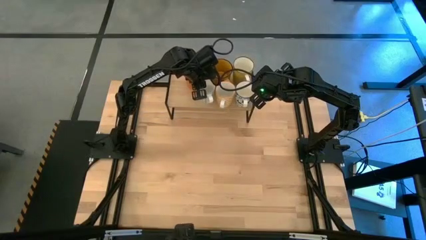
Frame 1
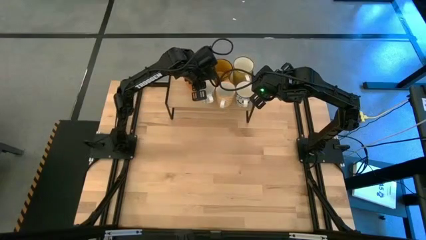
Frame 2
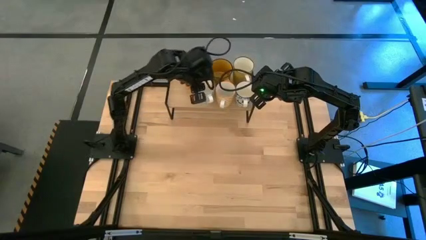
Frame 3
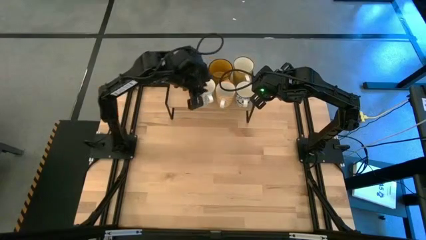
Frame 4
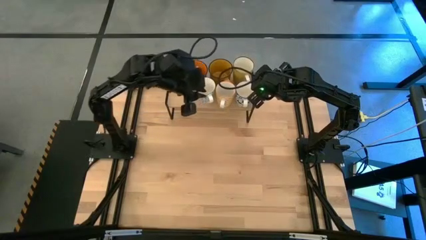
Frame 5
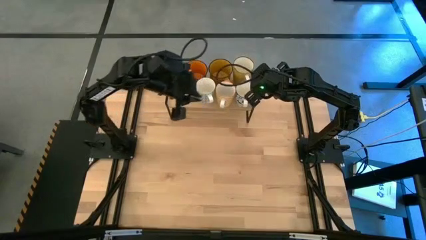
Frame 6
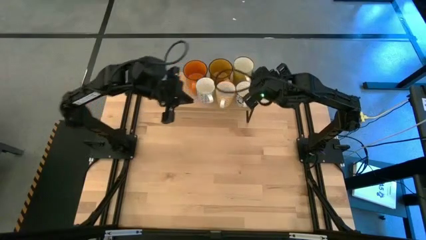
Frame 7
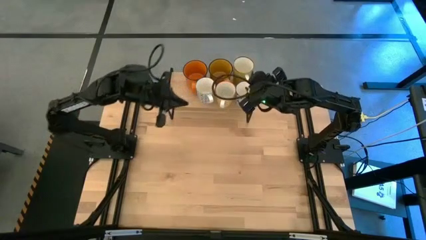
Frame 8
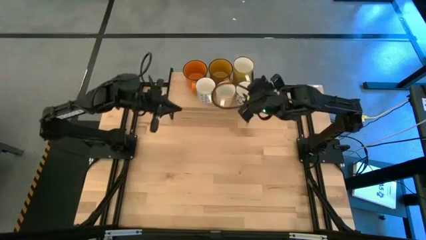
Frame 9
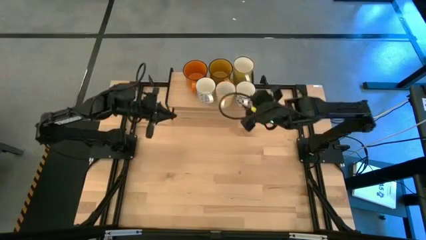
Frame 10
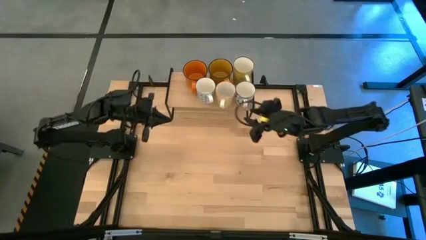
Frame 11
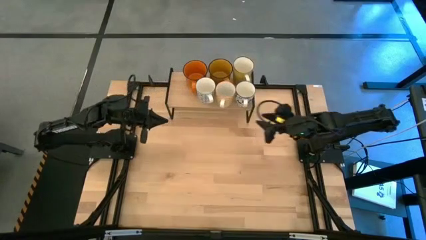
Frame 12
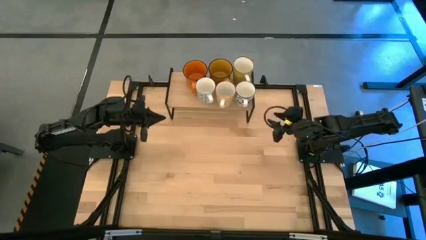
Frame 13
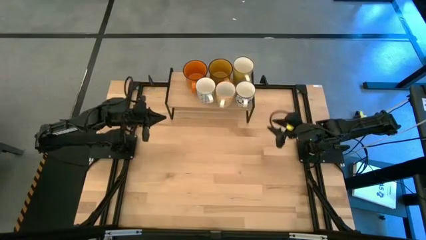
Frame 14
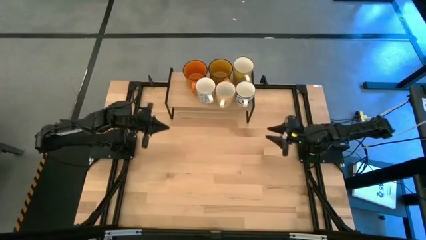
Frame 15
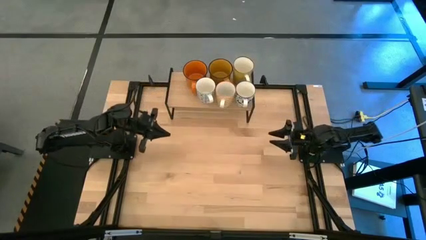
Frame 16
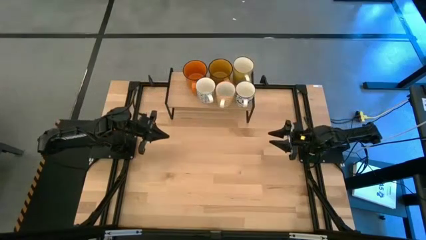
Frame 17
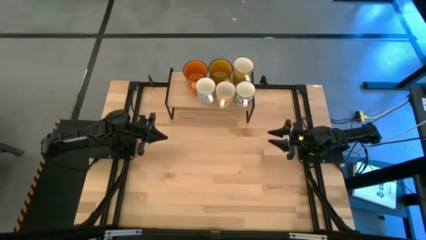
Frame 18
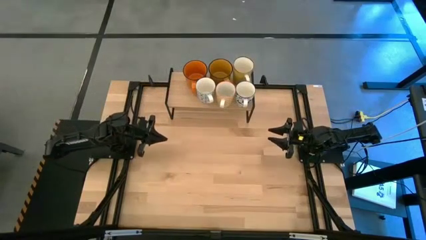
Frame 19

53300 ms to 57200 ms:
Task: Place coffee mugs
Return to Home Position

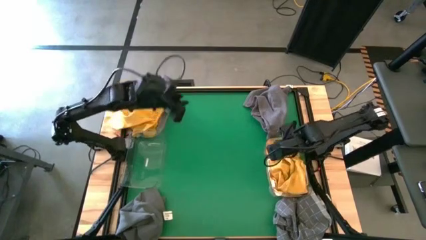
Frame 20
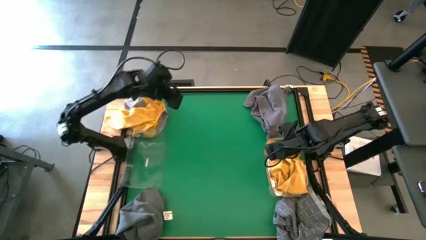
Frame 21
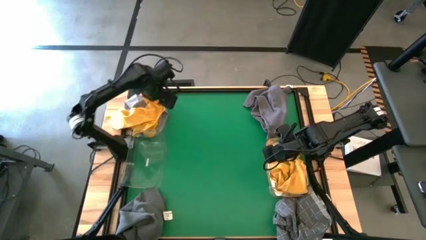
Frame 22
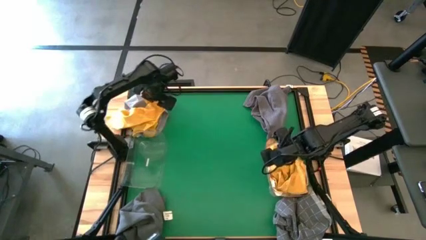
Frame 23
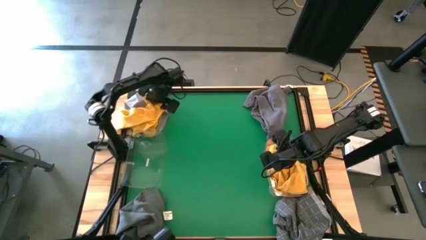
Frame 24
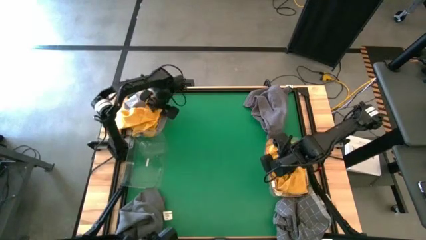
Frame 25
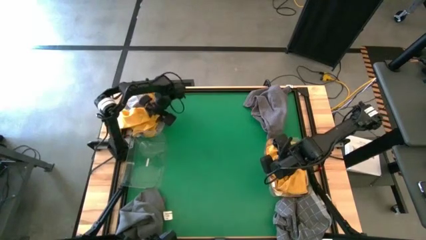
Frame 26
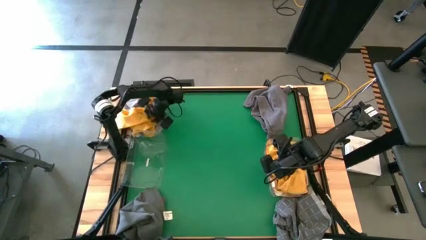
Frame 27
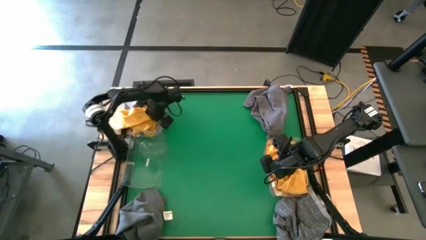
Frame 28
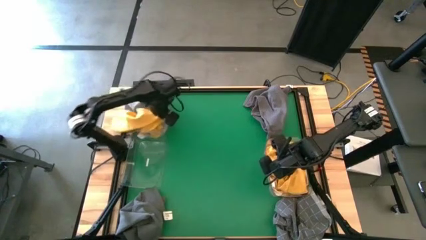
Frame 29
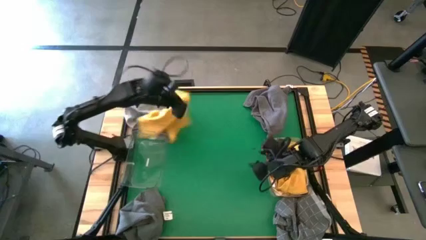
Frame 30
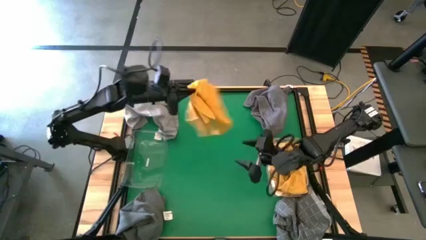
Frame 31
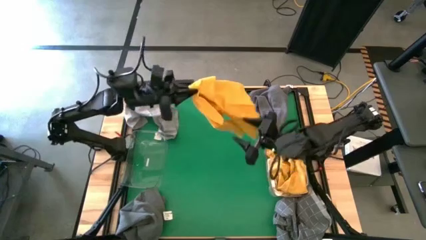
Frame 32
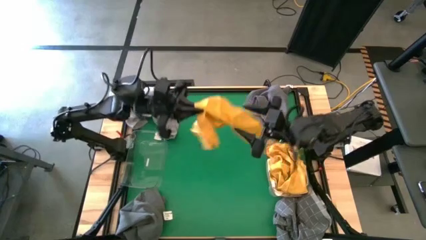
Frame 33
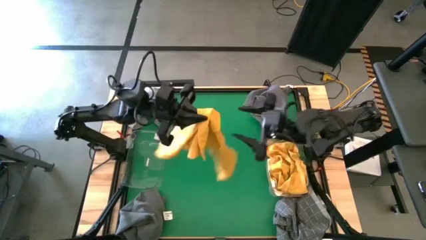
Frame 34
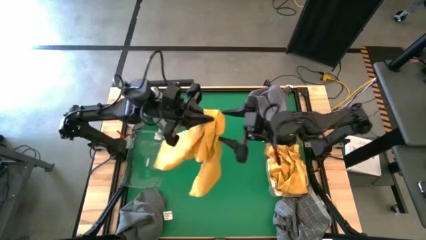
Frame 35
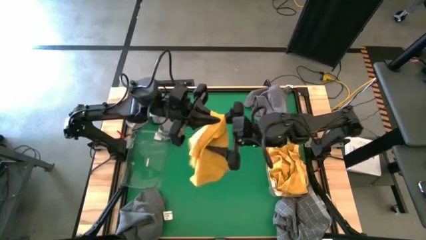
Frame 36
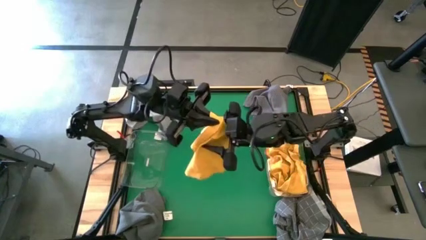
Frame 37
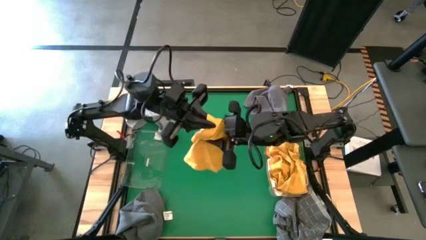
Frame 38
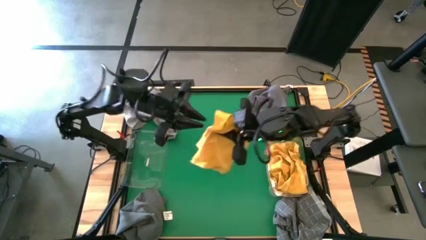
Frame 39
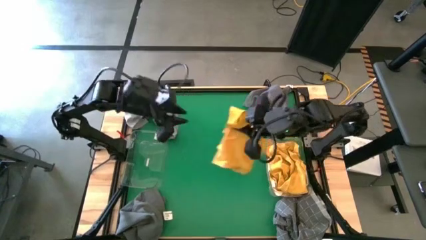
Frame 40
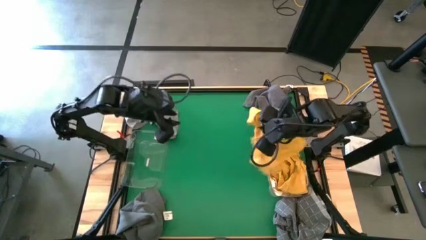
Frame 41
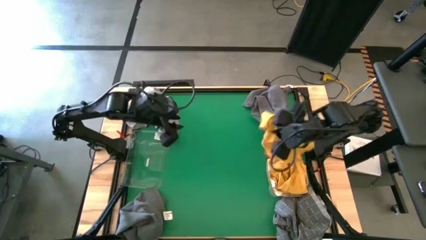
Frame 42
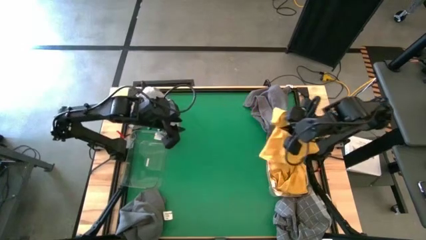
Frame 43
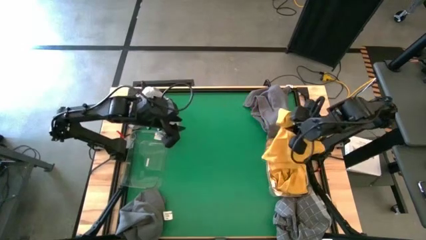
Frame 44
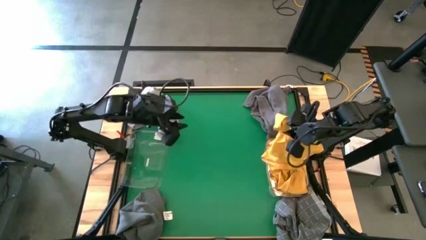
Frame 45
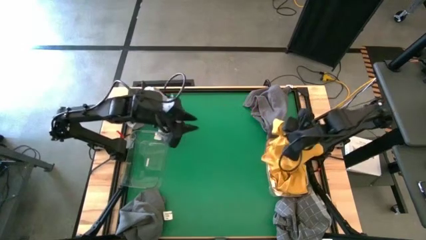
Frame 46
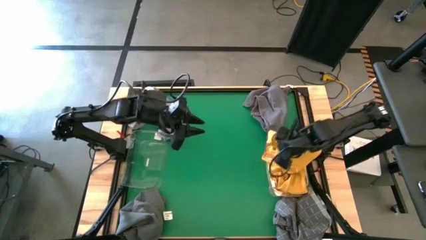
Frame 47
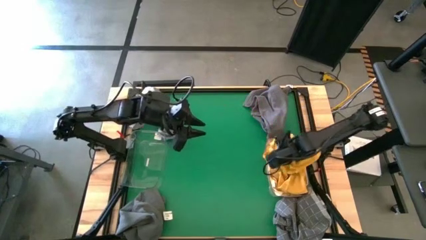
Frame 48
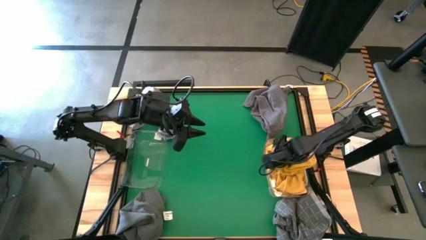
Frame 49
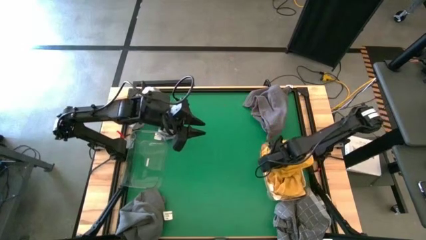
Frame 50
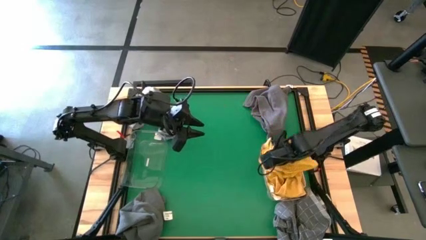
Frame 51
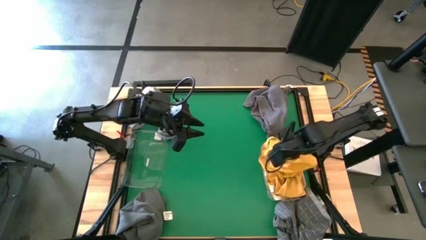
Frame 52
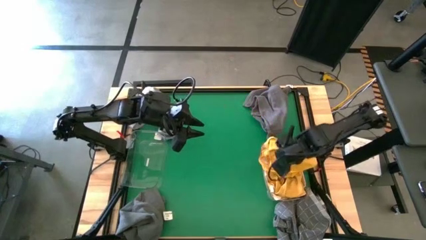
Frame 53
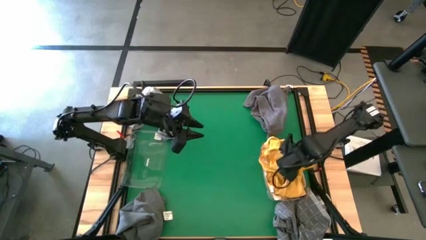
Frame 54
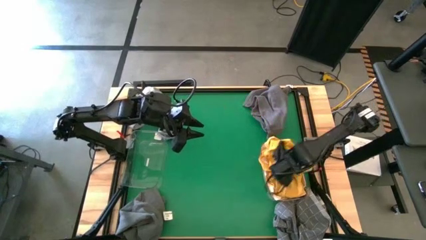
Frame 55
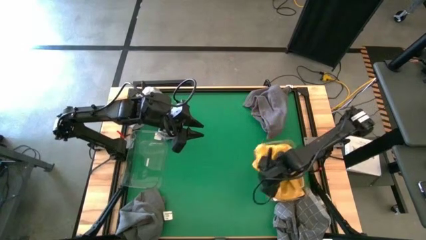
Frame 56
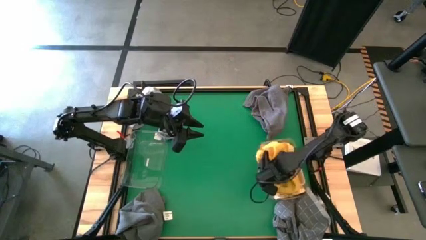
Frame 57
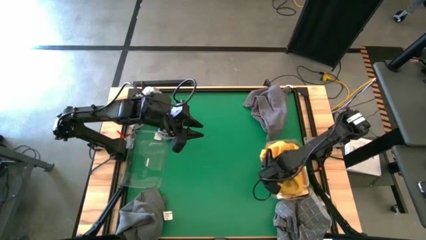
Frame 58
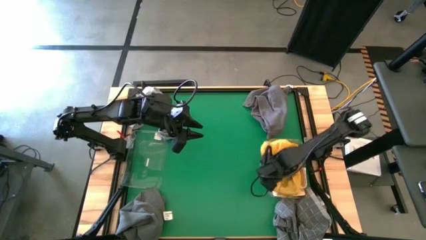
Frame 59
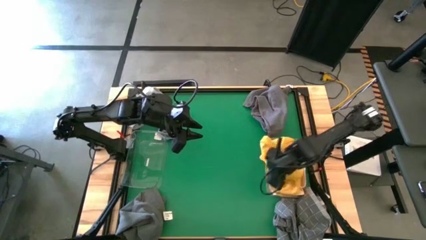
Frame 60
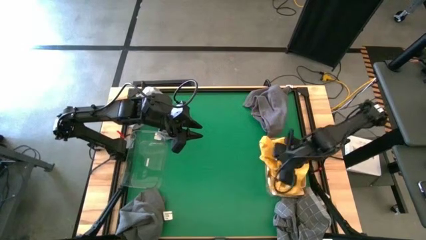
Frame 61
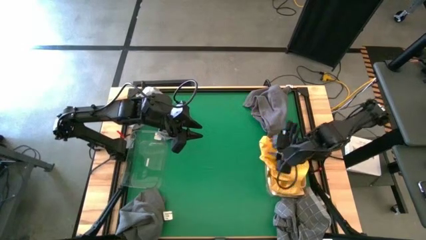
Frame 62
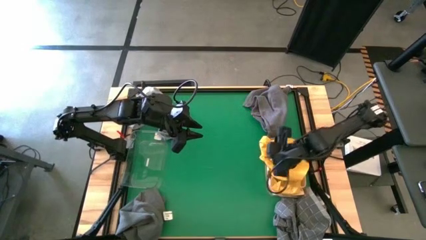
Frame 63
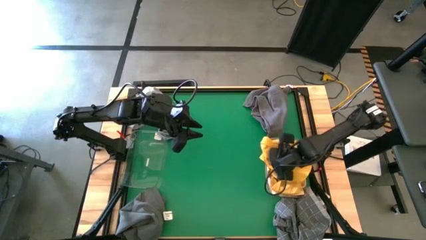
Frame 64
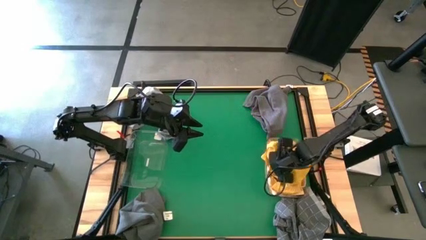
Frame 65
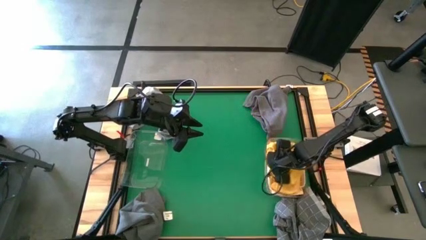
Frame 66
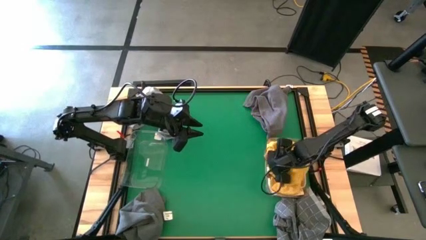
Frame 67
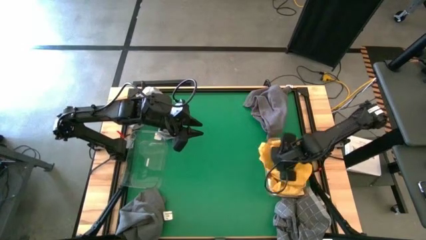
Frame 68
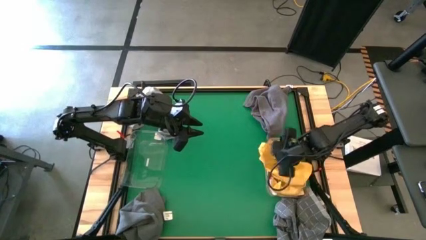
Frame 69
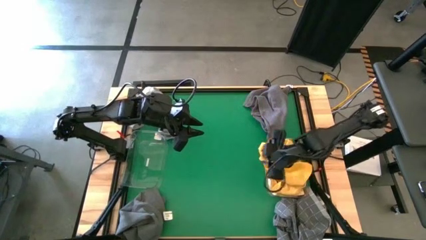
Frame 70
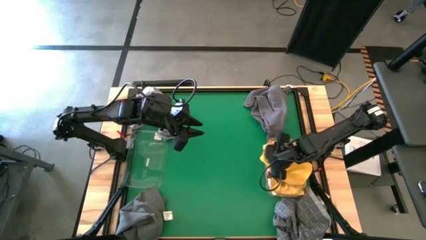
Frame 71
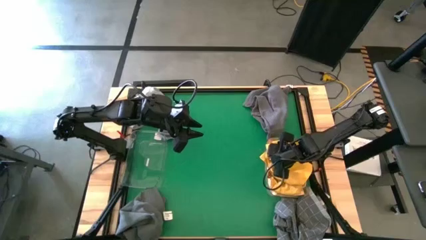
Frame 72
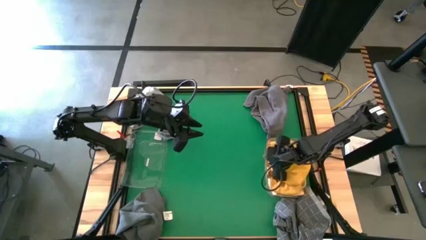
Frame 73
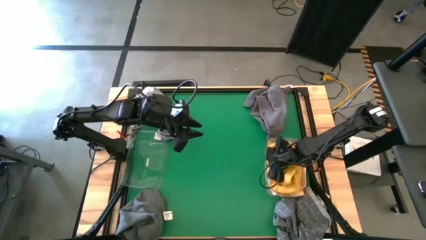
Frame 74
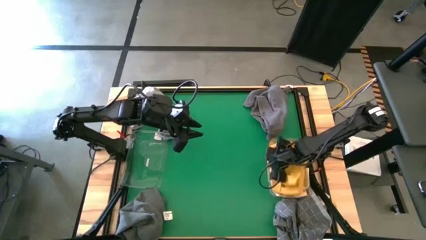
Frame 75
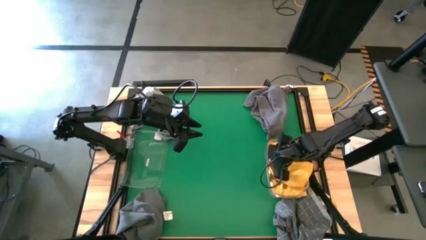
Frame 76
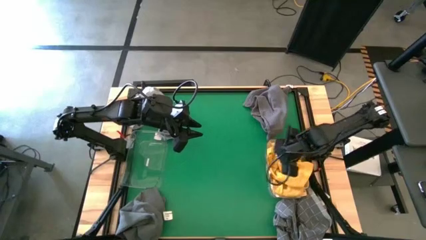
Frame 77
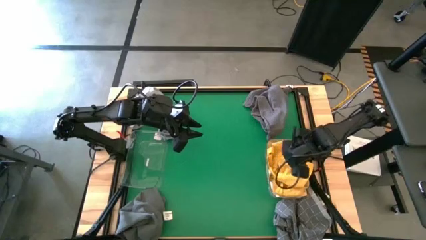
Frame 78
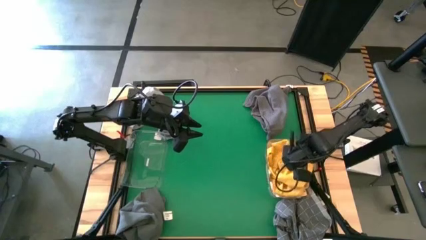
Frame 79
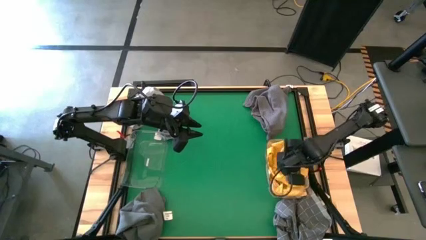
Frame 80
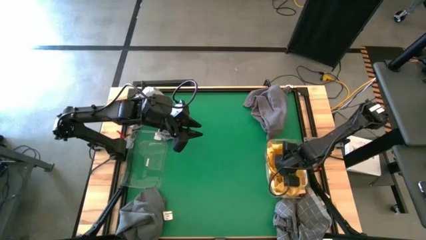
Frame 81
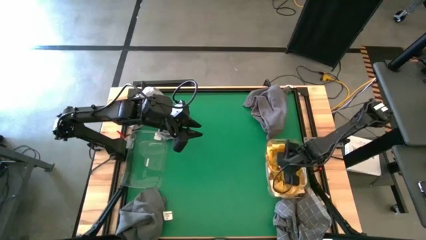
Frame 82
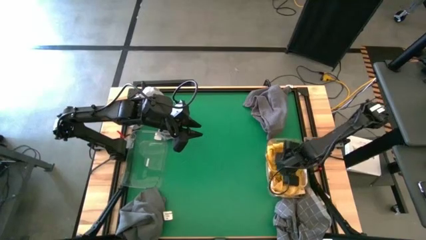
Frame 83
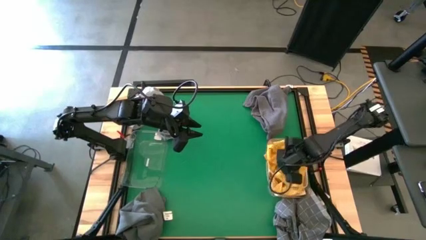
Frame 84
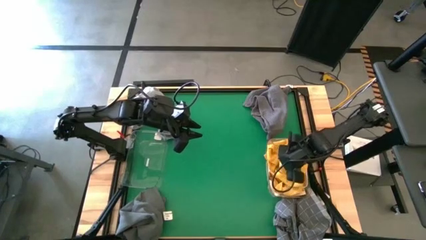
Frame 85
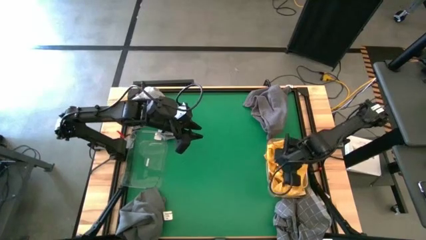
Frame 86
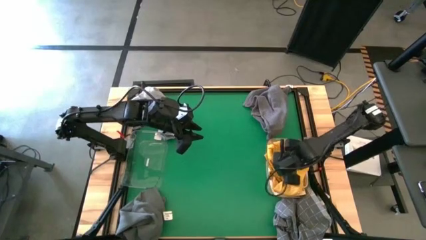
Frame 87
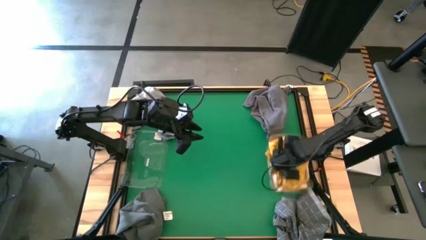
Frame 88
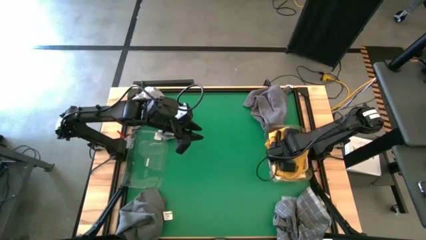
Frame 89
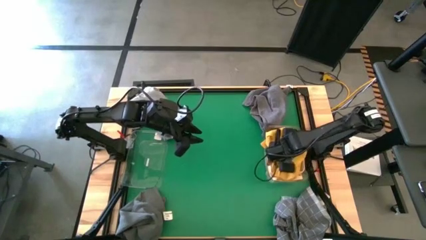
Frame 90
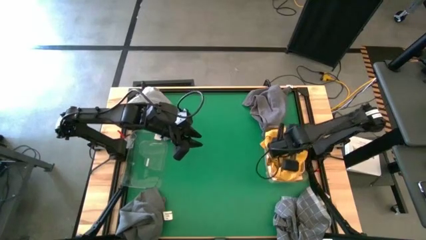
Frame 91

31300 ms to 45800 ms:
Task: Sort microfiber towel by color & place in baskets
Put the orange microfiber towel into the right transparent bin
